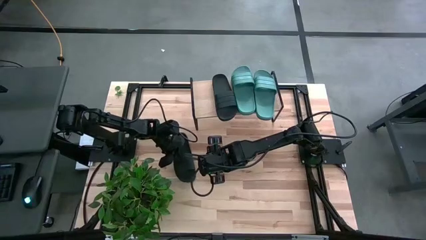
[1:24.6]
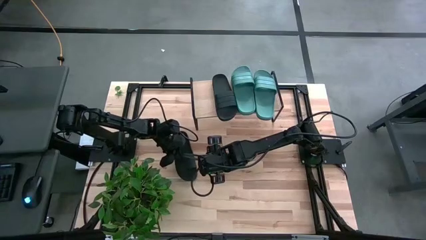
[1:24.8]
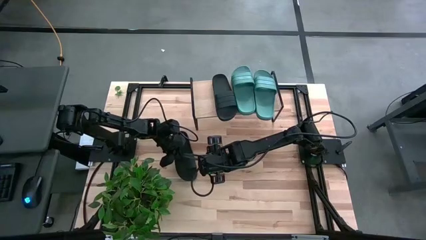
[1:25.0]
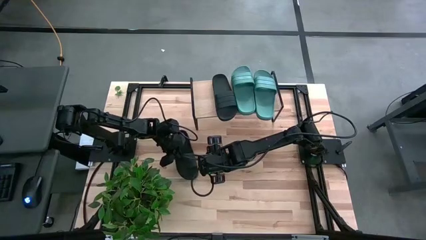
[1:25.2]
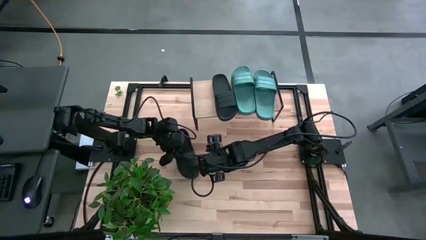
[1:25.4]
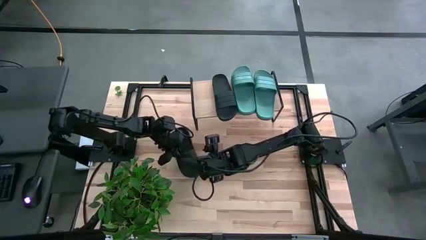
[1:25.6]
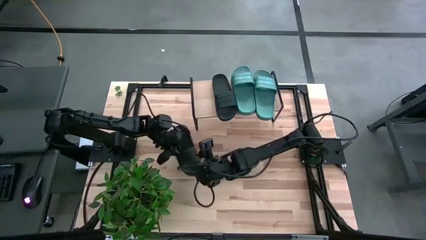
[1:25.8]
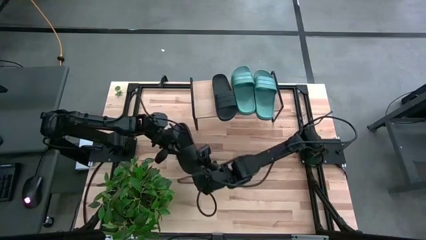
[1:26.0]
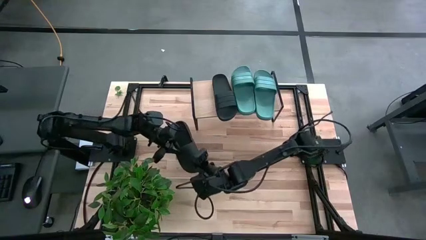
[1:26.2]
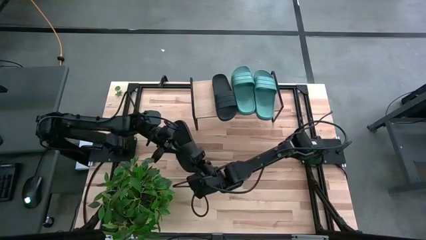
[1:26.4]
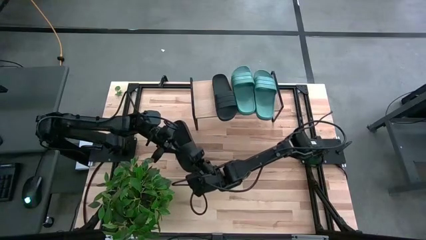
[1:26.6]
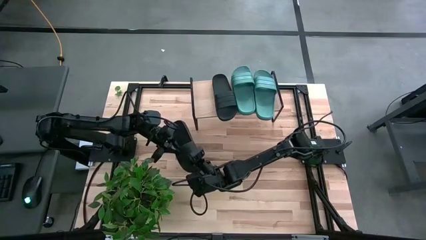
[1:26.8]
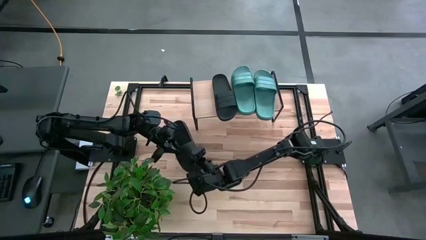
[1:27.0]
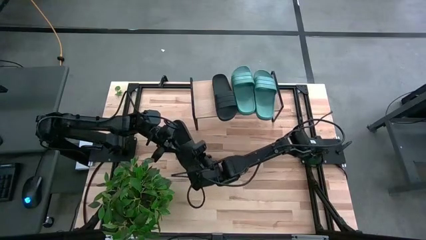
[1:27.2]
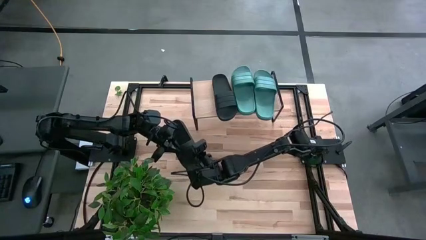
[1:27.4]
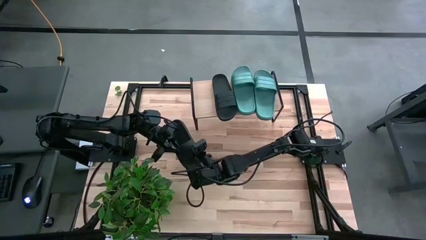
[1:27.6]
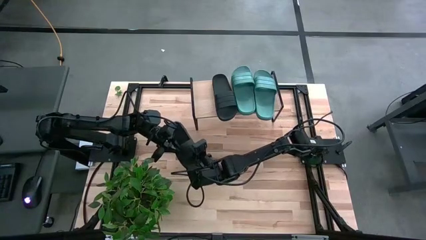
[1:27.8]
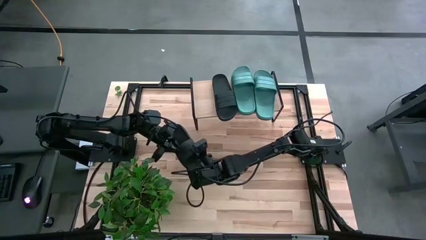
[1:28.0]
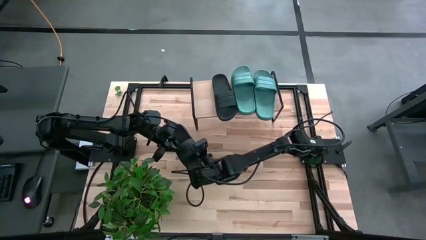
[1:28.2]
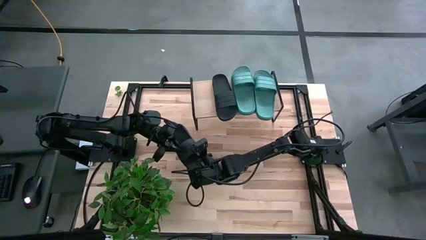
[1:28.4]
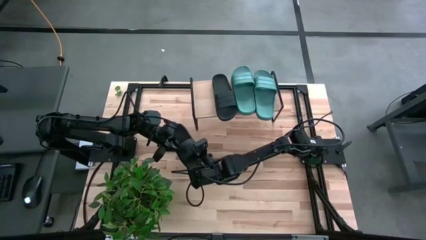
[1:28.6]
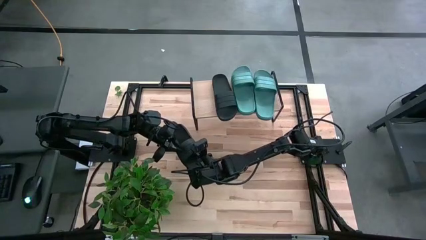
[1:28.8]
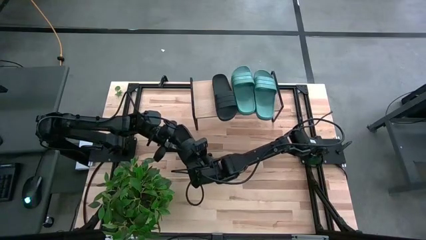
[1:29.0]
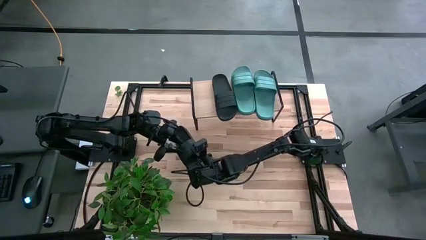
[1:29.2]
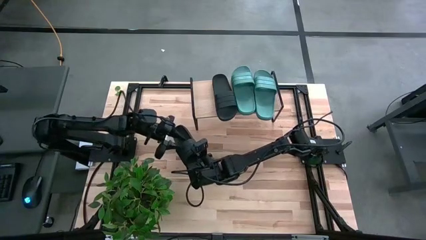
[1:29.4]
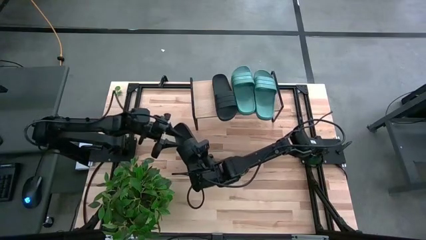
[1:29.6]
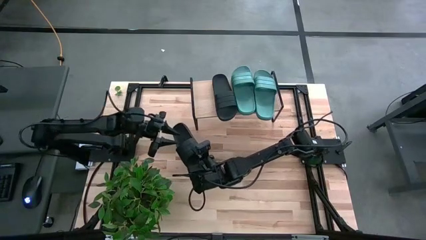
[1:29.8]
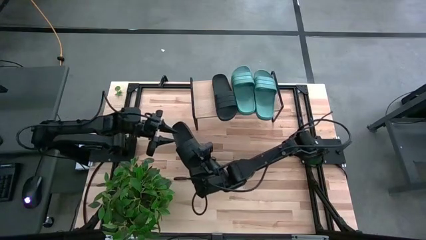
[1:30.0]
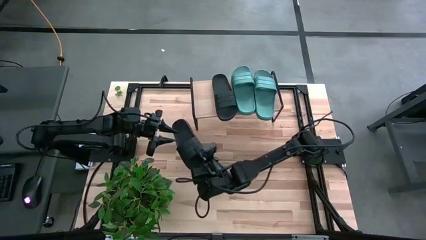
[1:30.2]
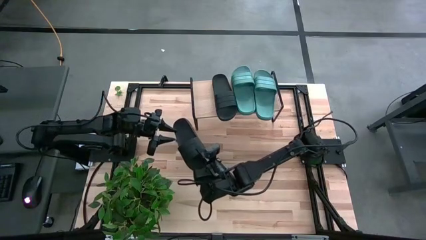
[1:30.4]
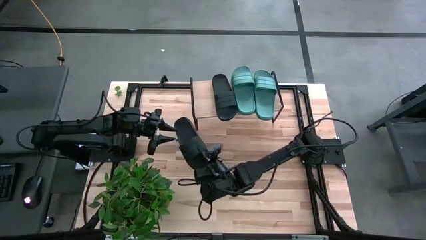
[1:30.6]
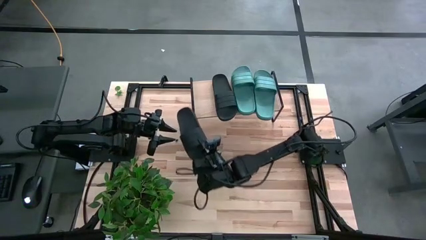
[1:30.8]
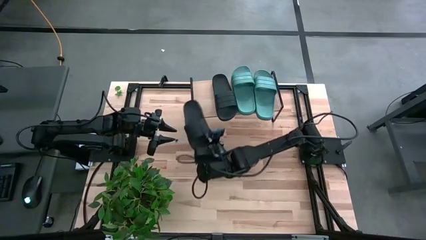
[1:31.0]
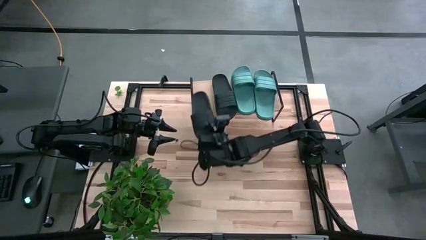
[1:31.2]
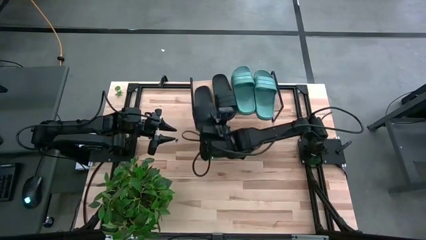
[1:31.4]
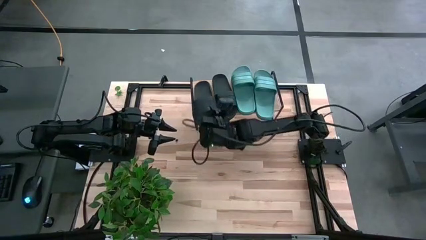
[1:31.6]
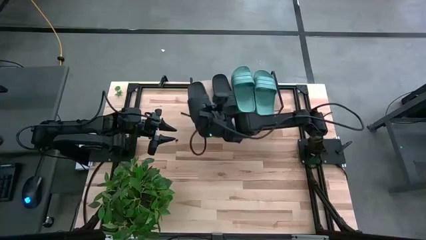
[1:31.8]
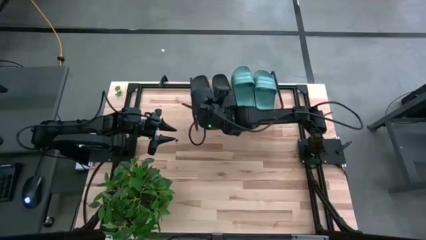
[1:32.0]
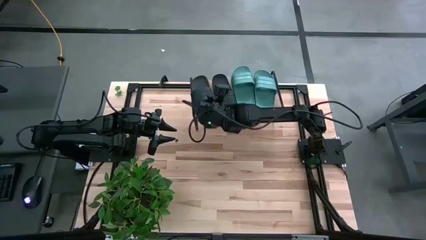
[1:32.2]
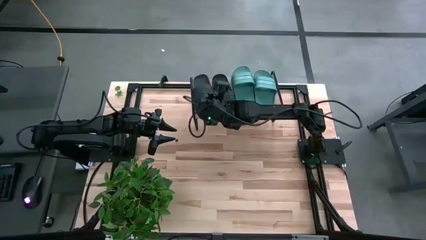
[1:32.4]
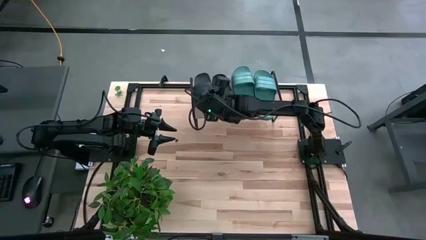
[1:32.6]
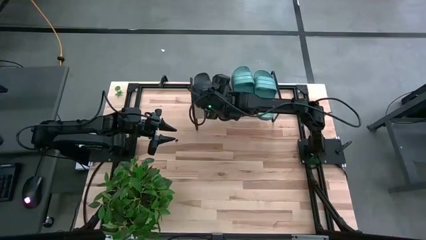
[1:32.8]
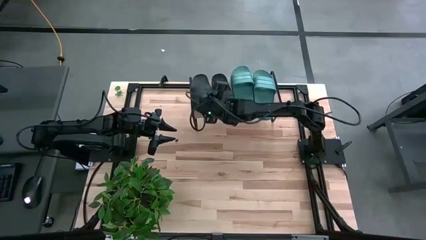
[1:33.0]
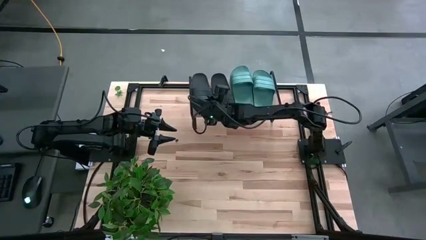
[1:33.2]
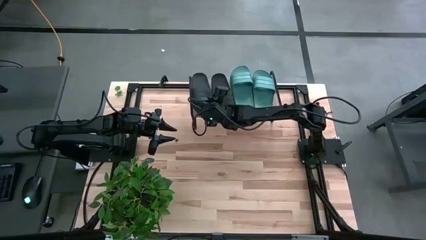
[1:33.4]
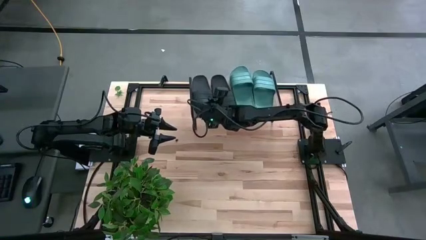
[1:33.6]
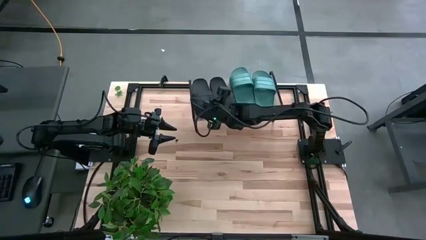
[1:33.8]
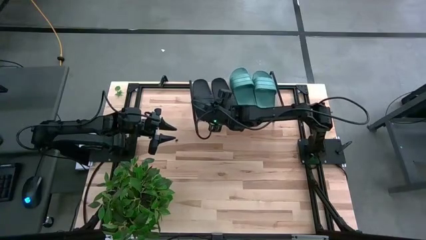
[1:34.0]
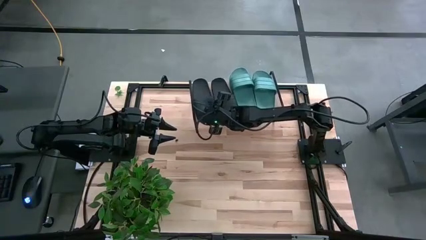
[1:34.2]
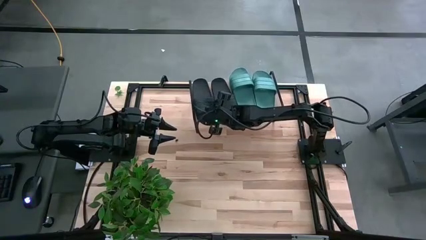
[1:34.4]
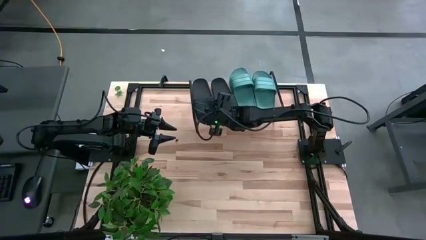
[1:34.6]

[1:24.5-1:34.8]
Task: Pick and place slides into the shelf
Put the dark green slipper on the shelf
